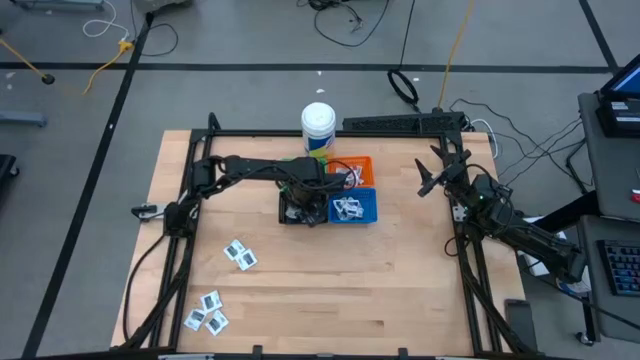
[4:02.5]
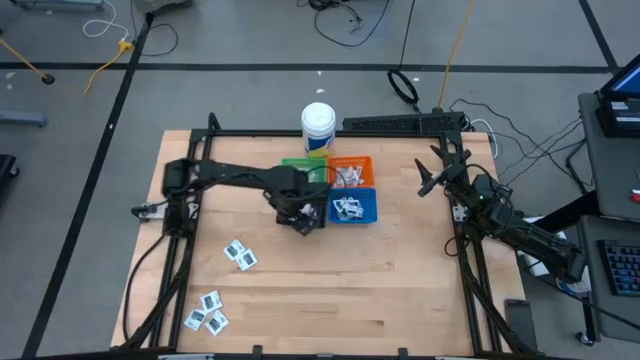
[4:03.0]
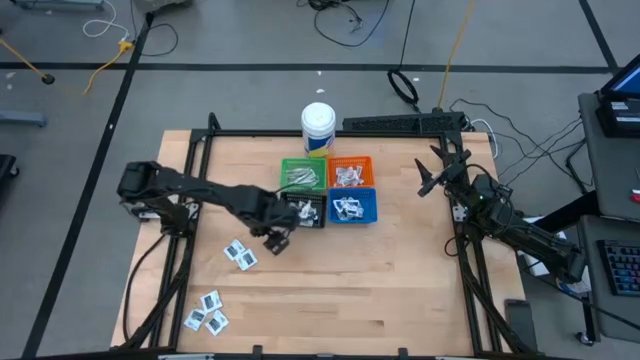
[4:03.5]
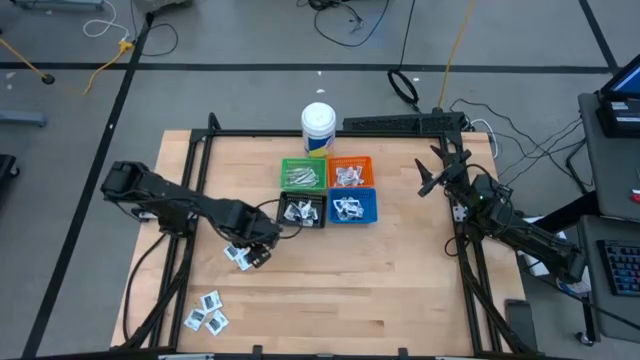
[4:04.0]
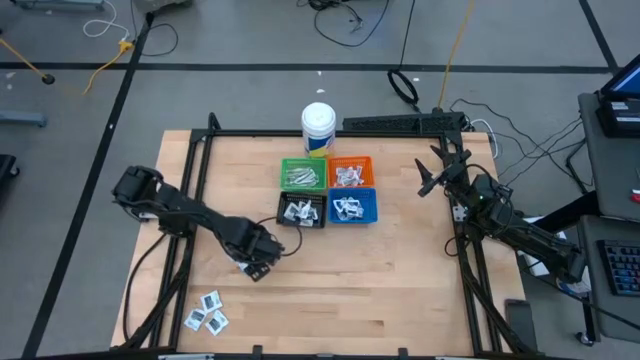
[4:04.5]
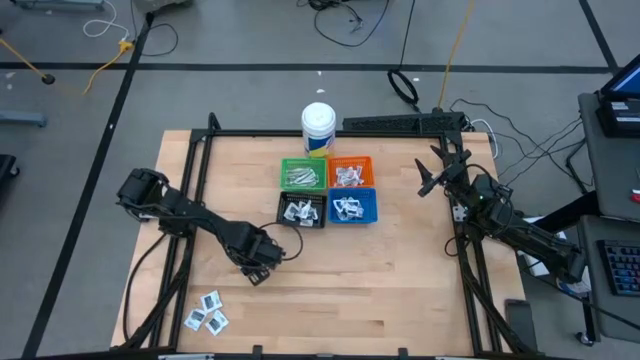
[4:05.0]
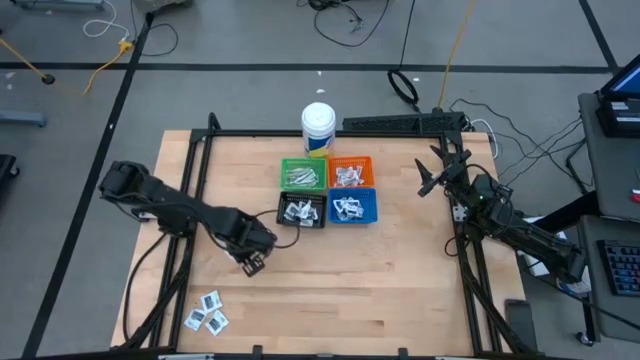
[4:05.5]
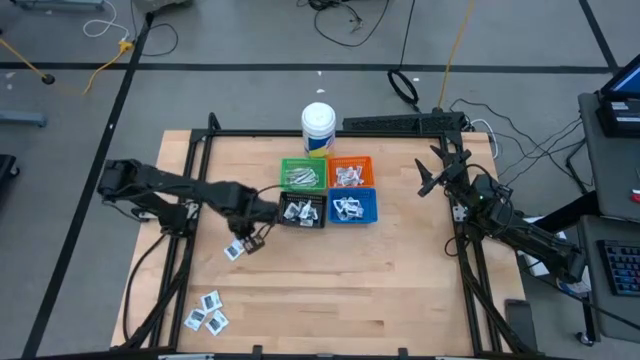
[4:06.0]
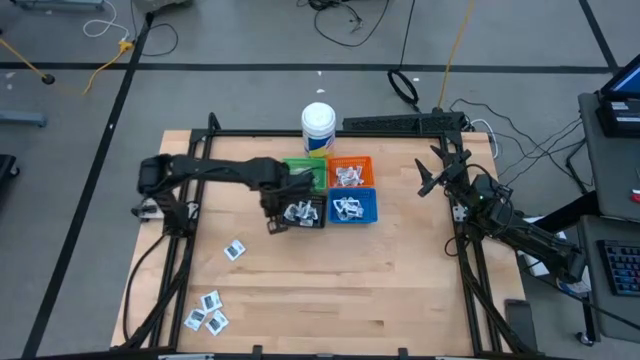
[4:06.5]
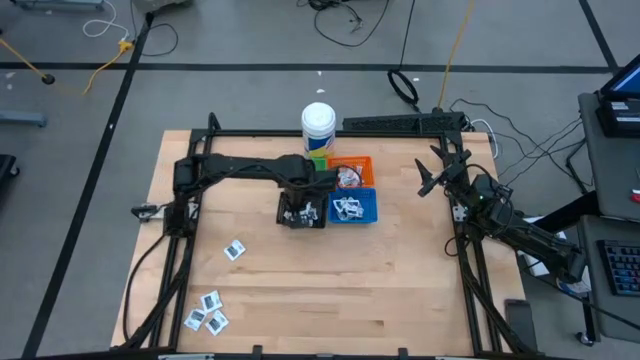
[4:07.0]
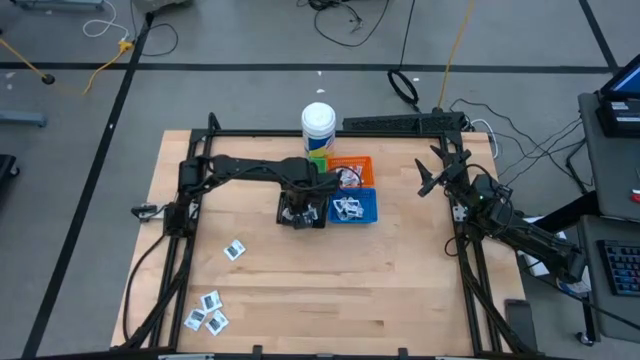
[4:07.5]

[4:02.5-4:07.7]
Task: Pick & Place First Aid Supplies
Put the black towelette pack into the black basket

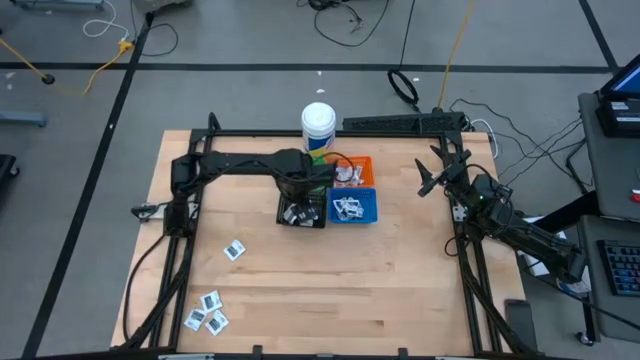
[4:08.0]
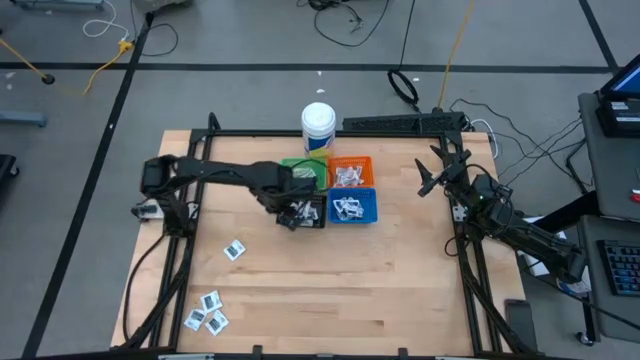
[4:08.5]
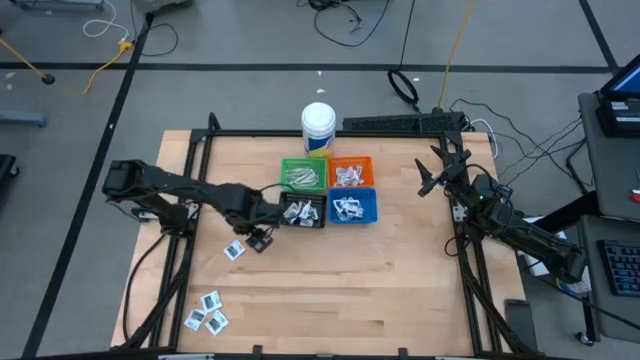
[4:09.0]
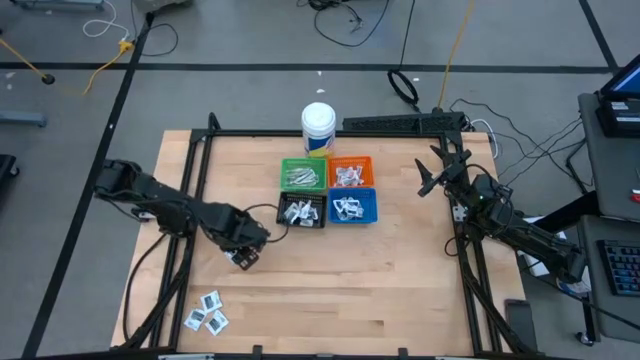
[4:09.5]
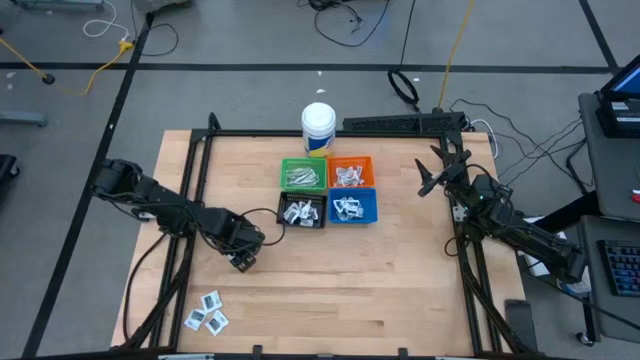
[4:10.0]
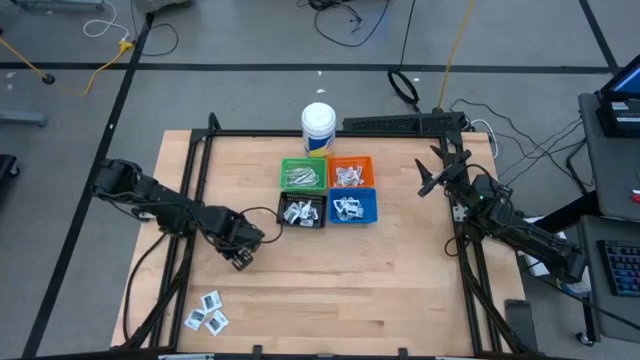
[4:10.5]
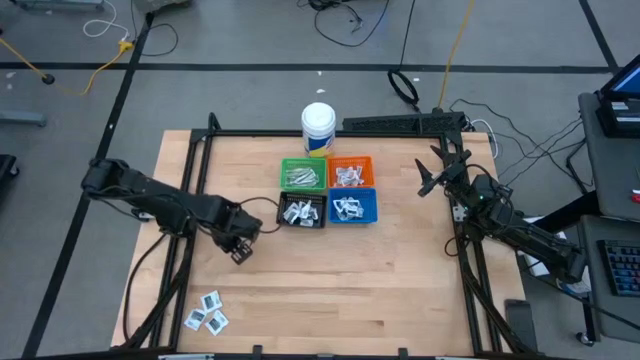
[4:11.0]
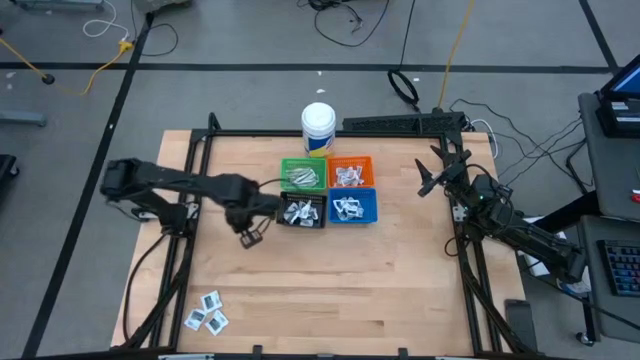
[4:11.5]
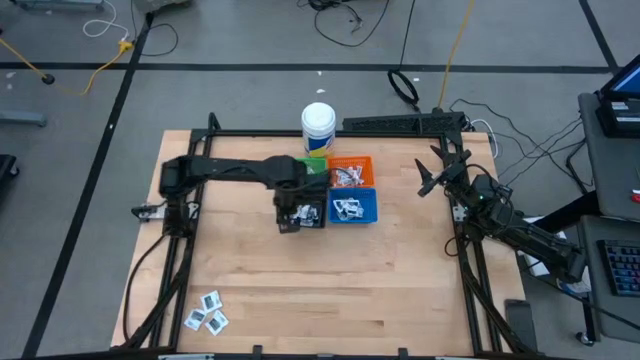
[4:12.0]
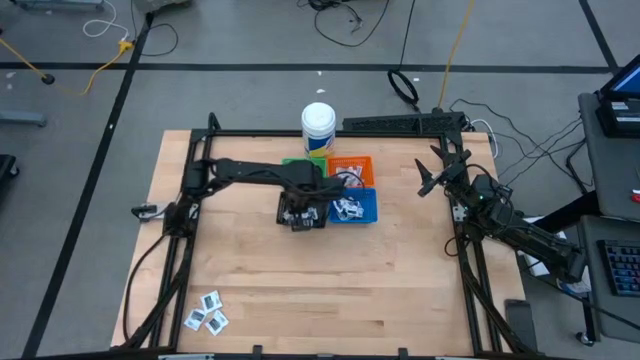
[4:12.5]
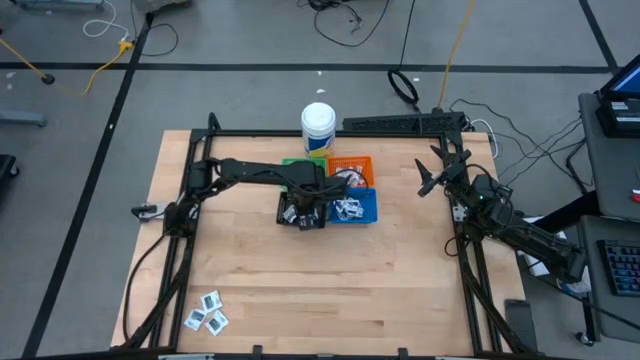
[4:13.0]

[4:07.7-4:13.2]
Put the black towelette pack into the black basket

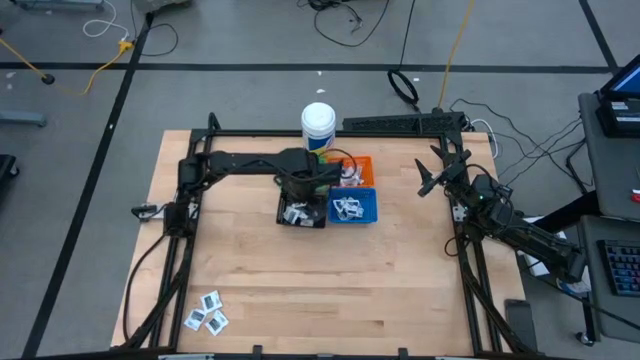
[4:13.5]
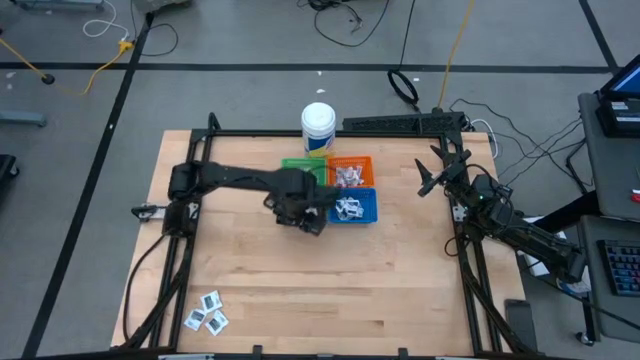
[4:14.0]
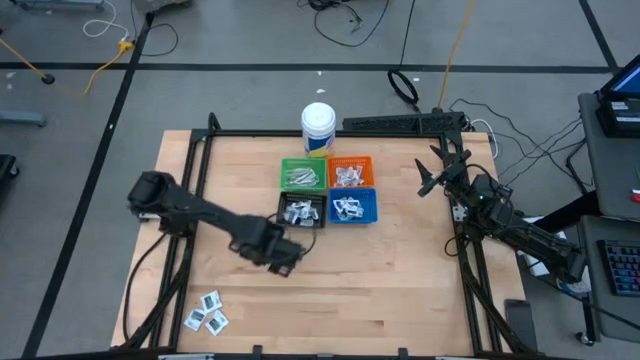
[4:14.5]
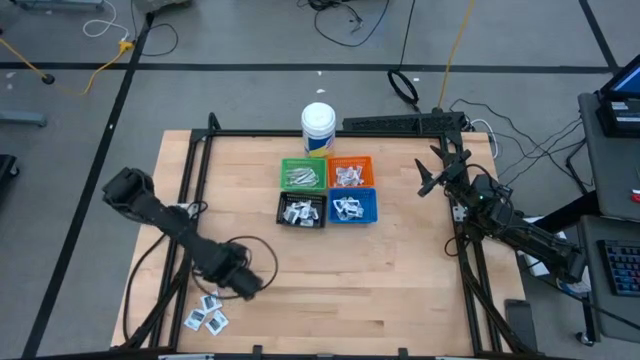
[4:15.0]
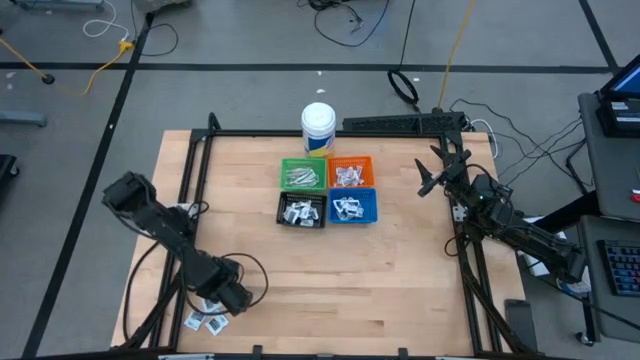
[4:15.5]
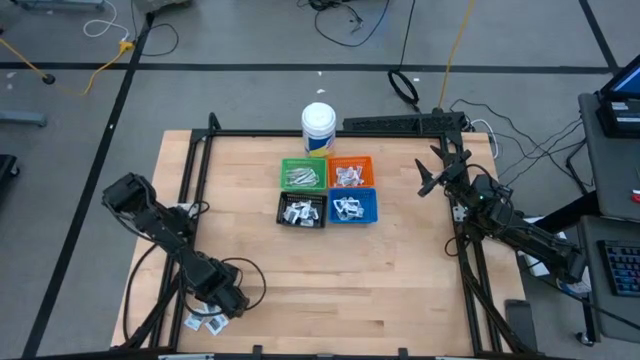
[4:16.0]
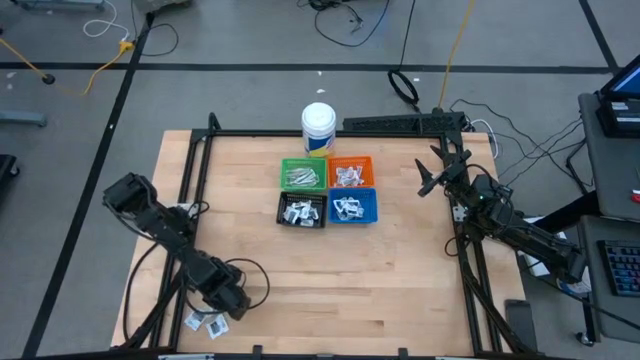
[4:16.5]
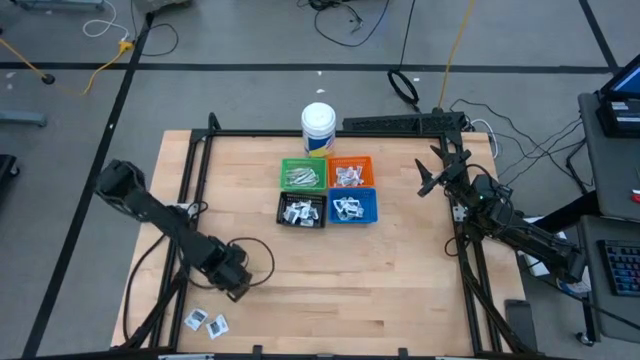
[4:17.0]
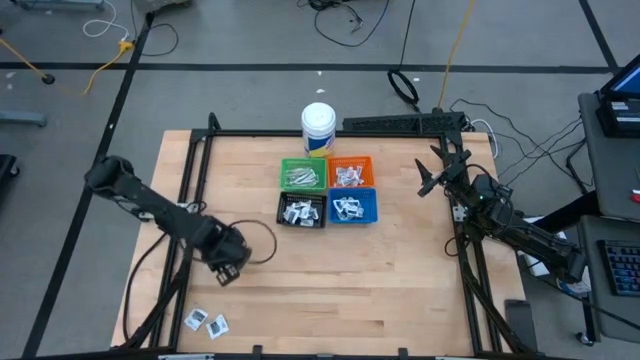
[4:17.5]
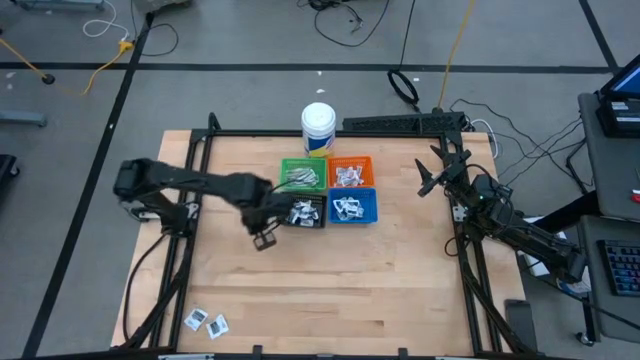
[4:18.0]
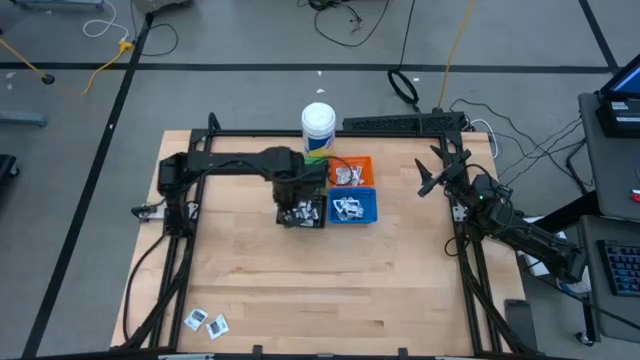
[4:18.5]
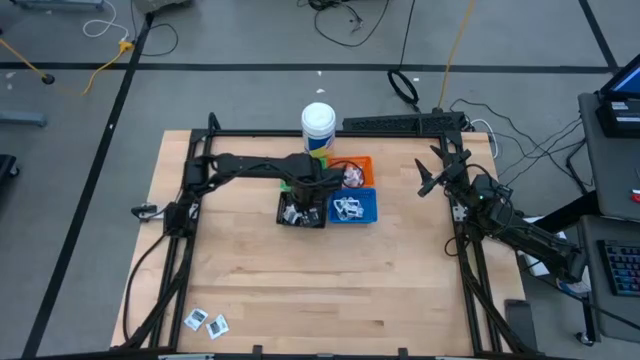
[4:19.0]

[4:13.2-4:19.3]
Put the black towelette pack into the black basket

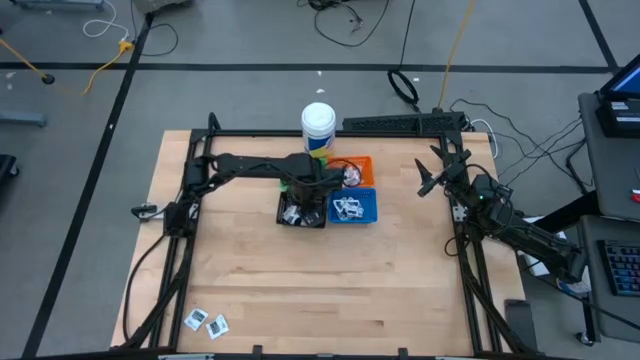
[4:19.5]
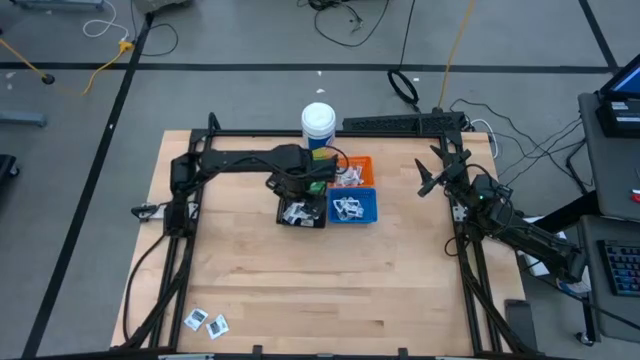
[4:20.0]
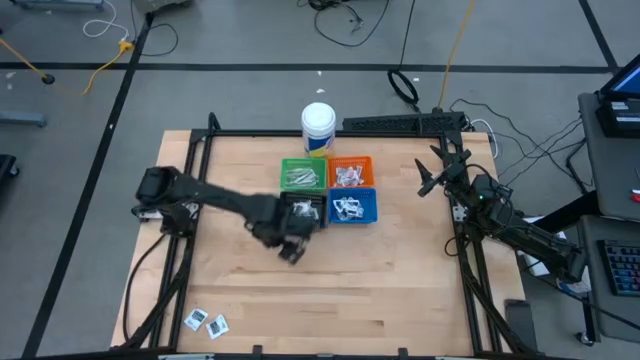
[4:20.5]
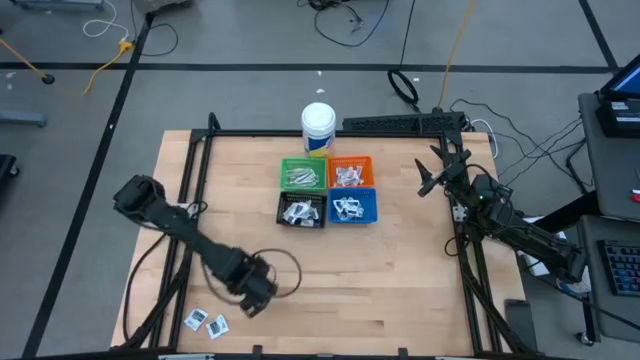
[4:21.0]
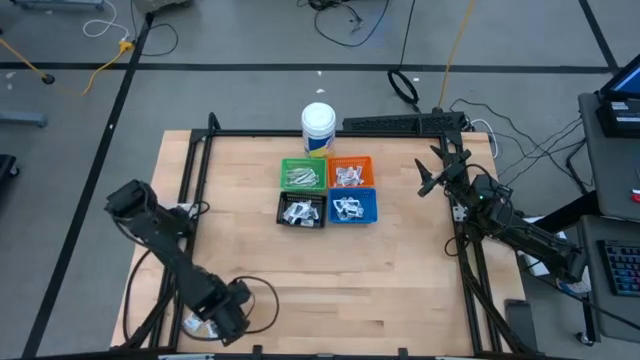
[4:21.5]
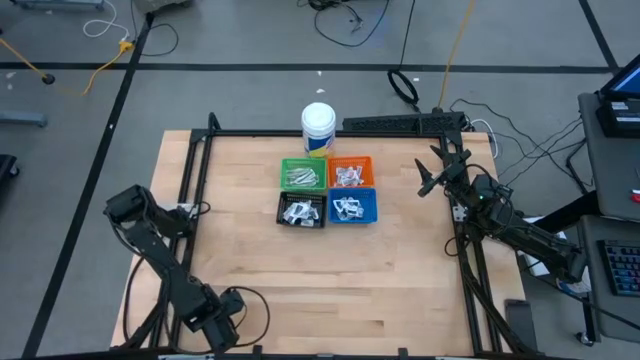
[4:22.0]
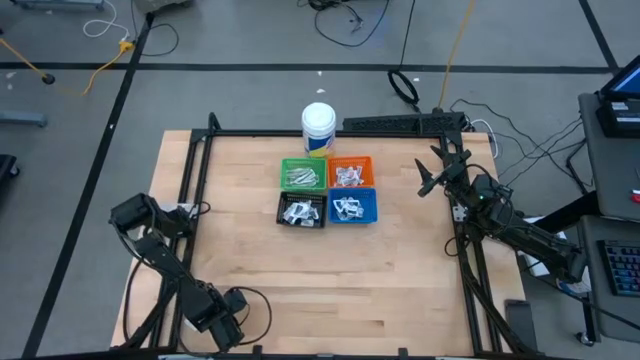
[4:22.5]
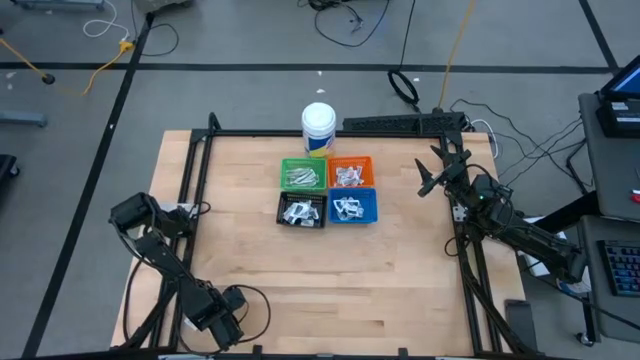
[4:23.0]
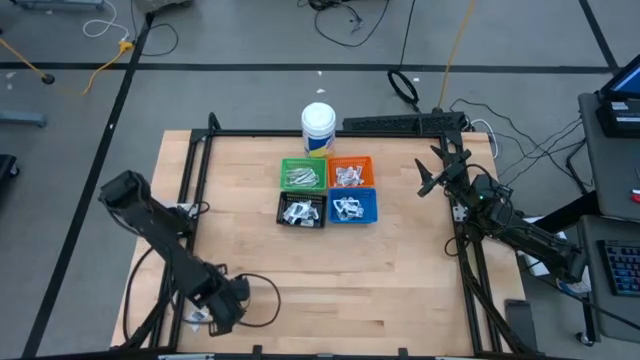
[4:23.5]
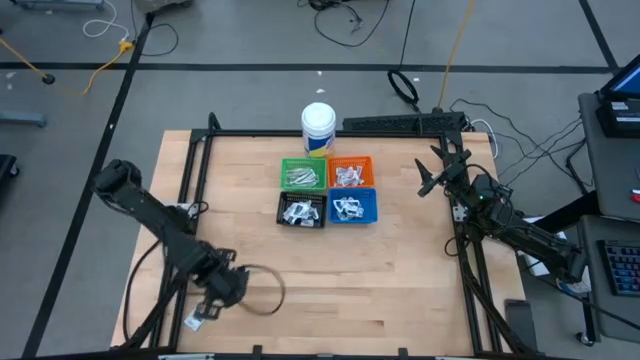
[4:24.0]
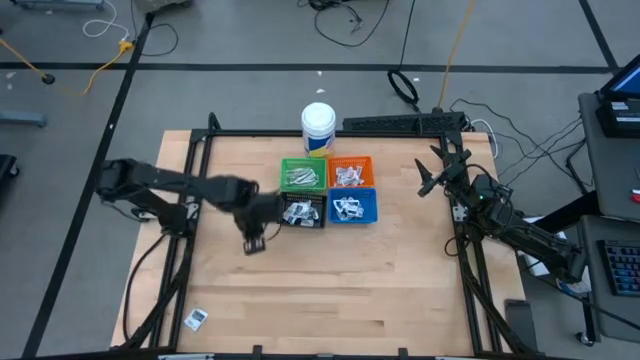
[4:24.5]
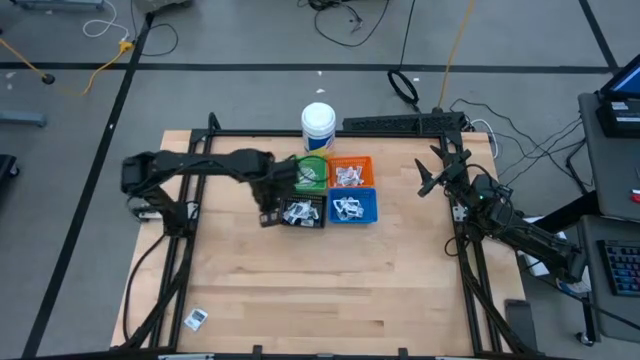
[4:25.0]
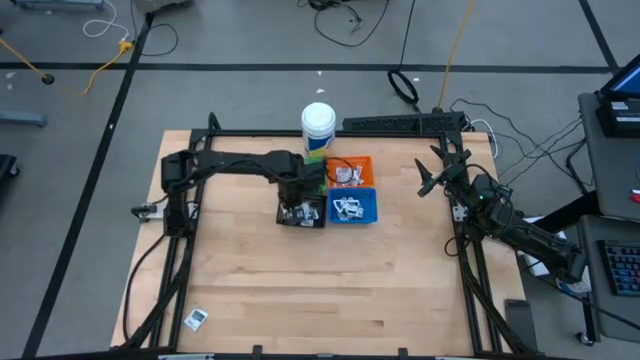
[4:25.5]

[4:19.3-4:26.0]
Put the black towelette pack into the black basket
